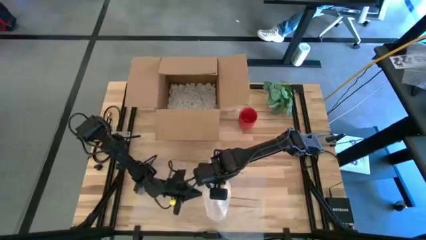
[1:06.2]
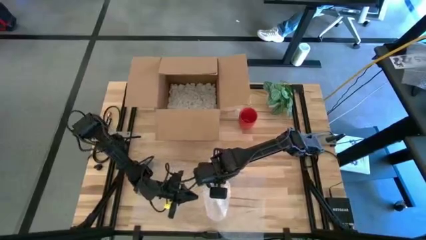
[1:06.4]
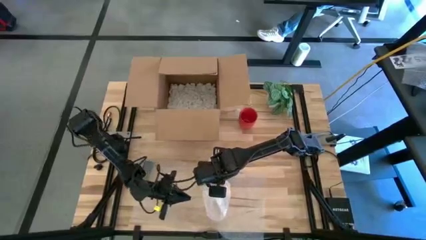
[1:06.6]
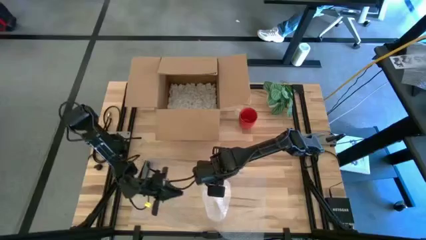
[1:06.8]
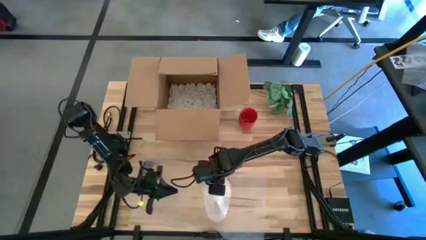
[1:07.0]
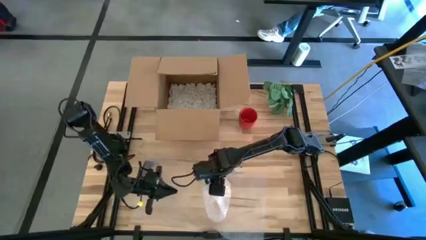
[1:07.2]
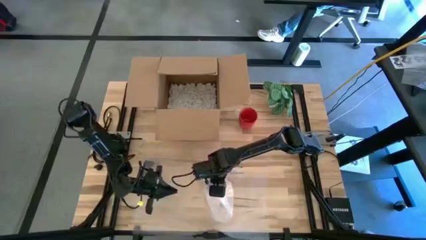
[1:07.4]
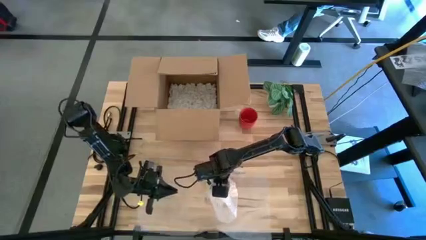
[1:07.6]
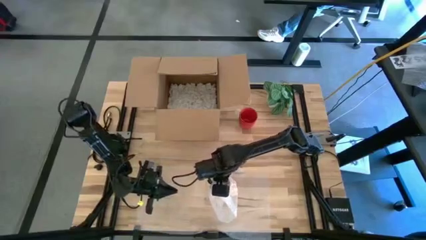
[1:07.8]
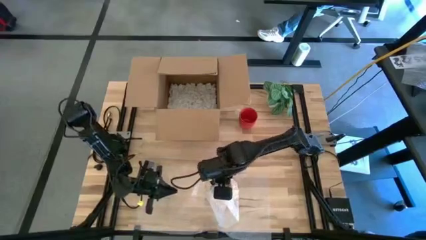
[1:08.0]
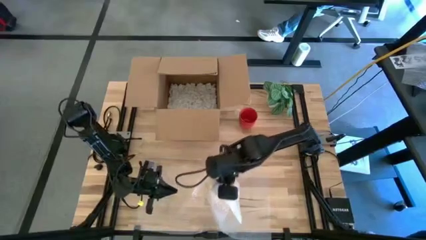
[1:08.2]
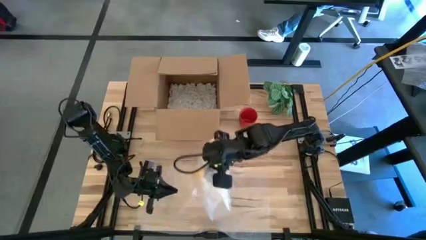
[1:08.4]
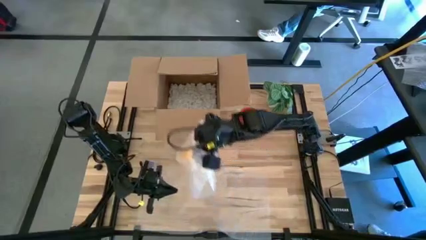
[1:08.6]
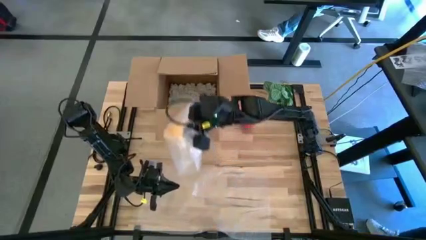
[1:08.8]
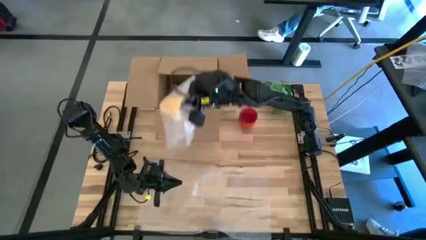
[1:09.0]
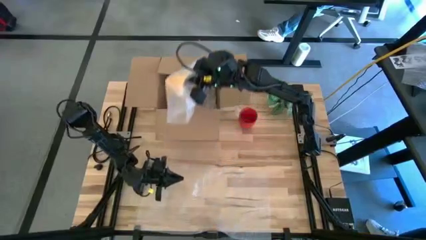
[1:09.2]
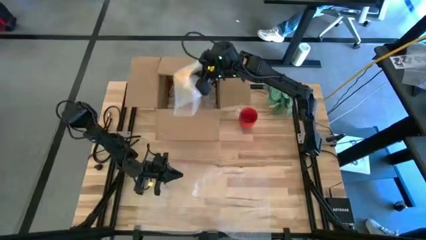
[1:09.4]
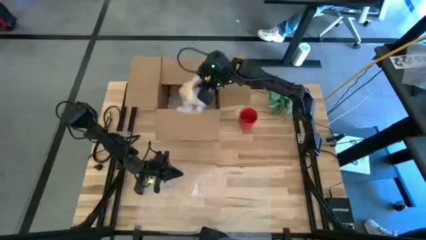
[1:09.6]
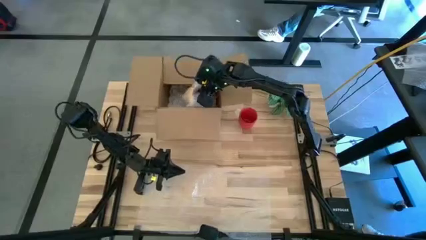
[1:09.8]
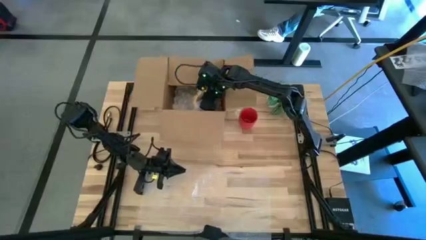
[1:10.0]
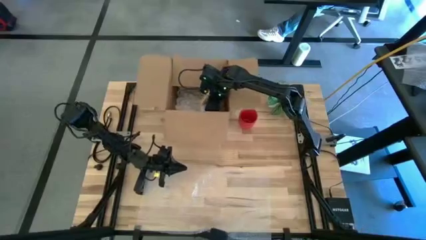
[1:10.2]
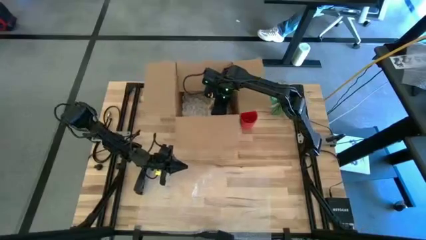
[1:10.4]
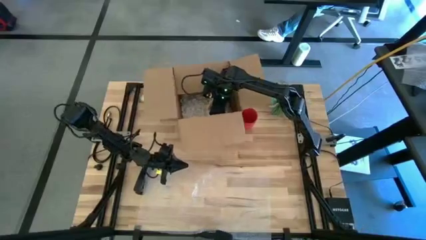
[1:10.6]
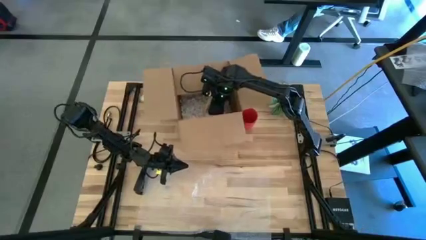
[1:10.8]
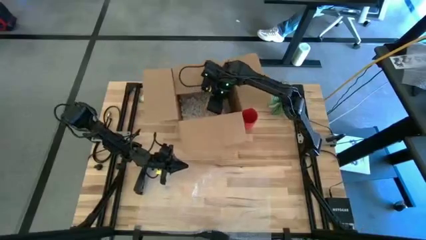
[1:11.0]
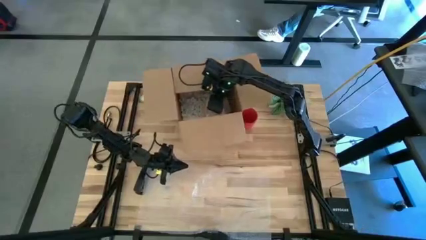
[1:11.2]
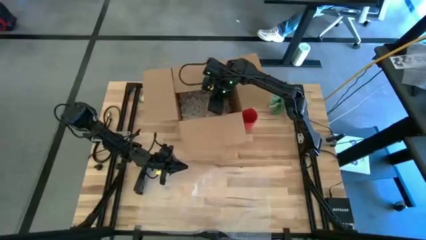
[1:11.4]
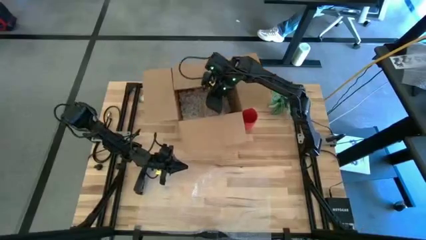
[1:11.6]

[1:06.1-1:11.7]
Task: wrap mug
Put the wrapped yellow mug into the cardboard box

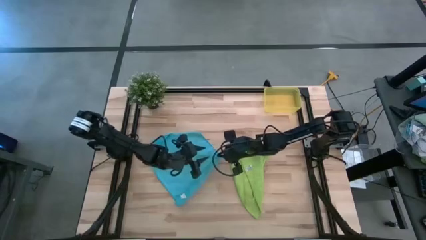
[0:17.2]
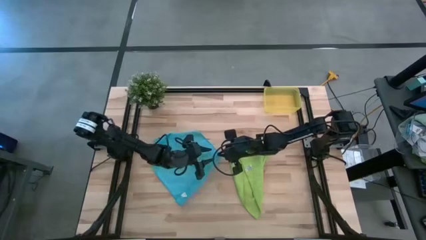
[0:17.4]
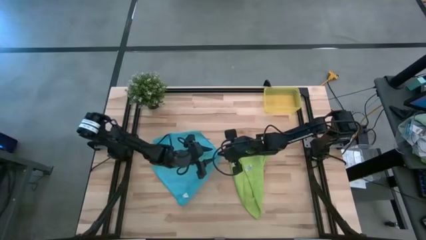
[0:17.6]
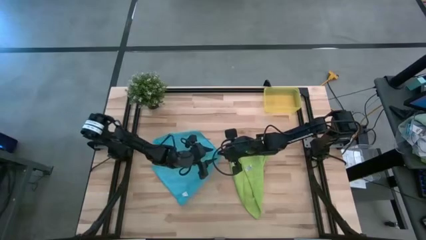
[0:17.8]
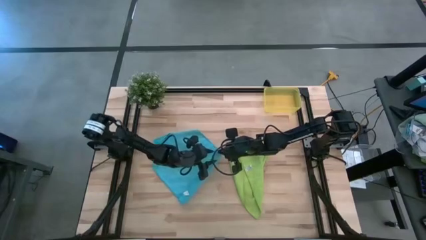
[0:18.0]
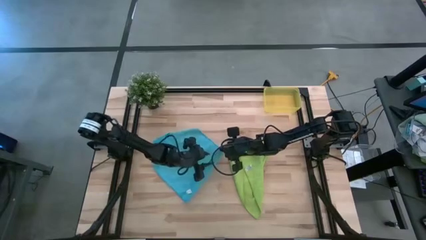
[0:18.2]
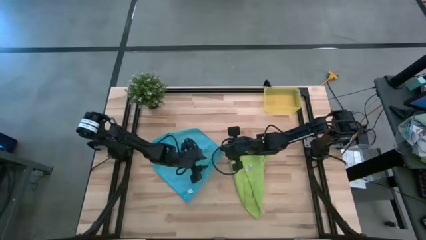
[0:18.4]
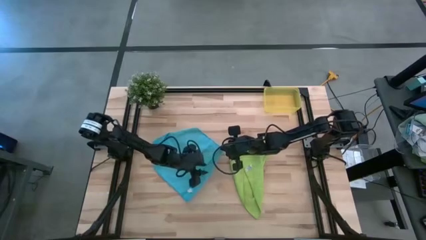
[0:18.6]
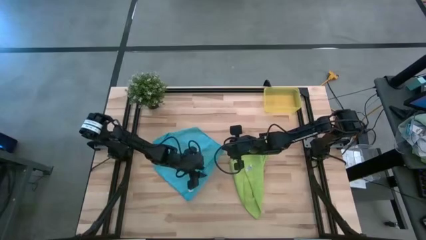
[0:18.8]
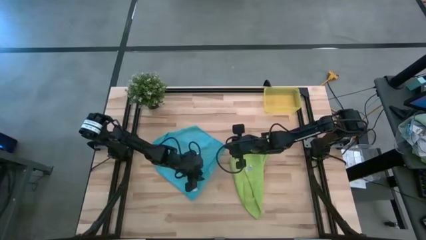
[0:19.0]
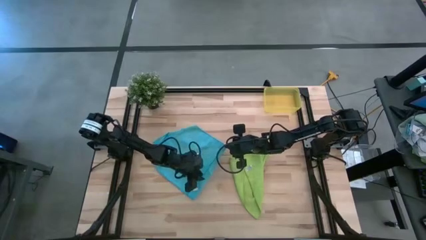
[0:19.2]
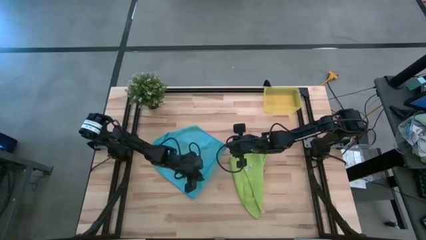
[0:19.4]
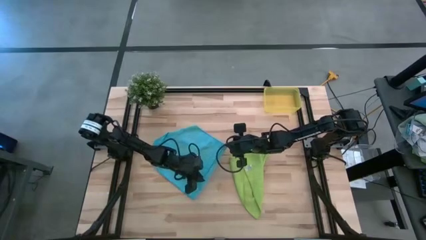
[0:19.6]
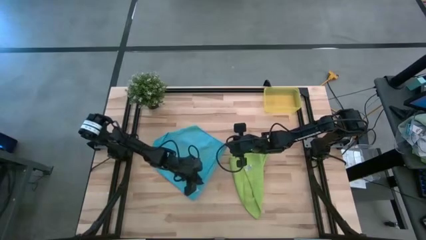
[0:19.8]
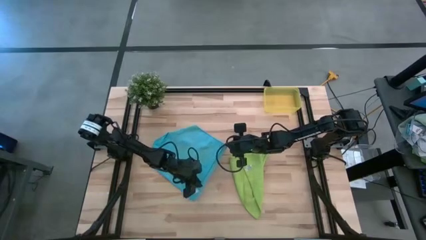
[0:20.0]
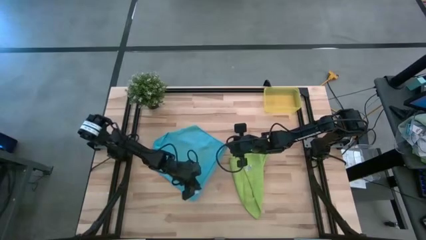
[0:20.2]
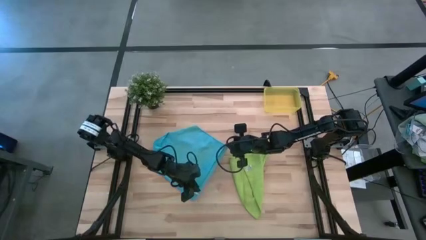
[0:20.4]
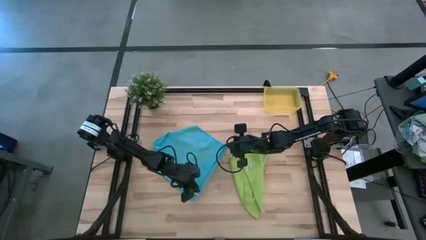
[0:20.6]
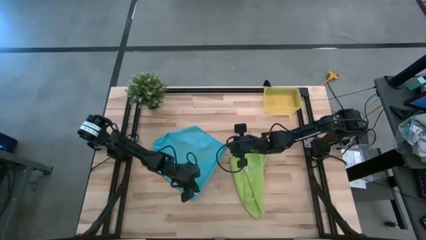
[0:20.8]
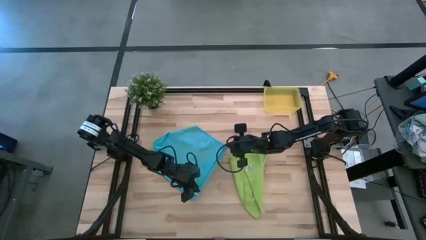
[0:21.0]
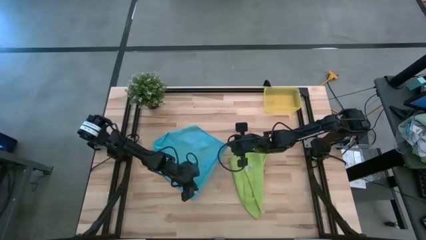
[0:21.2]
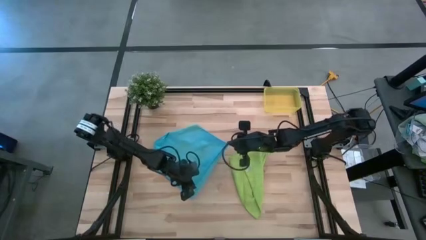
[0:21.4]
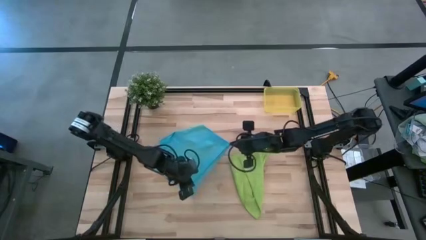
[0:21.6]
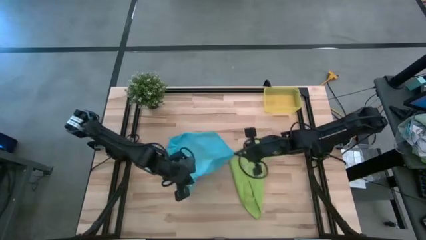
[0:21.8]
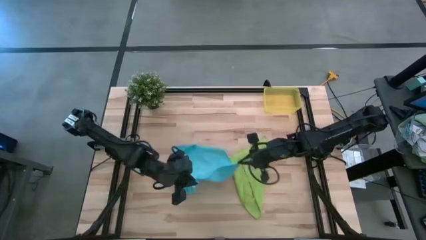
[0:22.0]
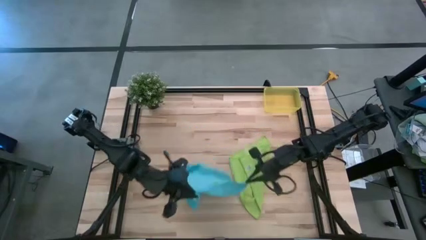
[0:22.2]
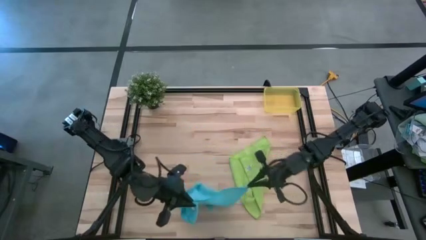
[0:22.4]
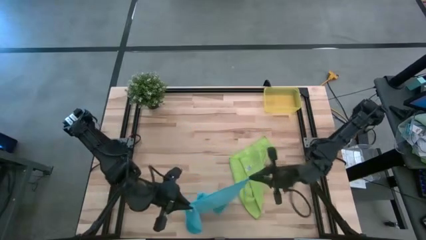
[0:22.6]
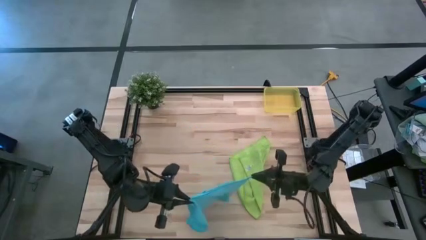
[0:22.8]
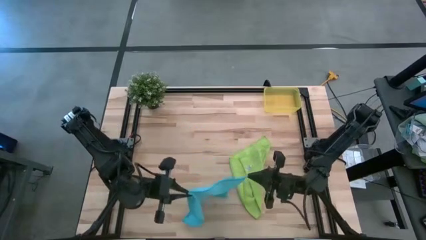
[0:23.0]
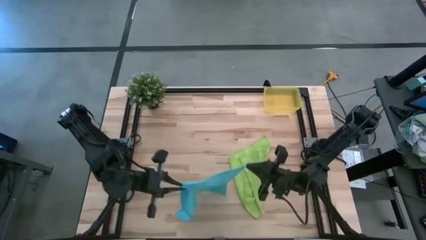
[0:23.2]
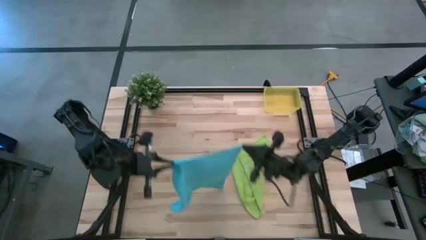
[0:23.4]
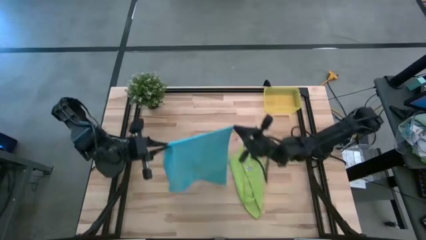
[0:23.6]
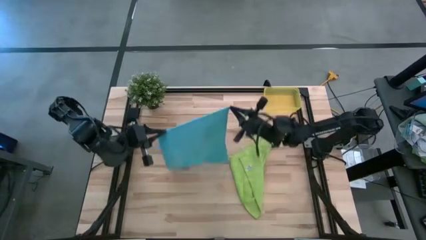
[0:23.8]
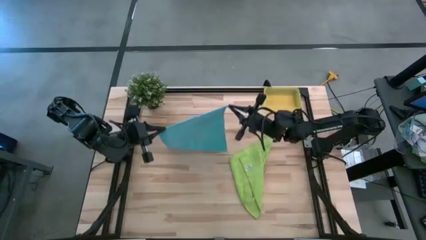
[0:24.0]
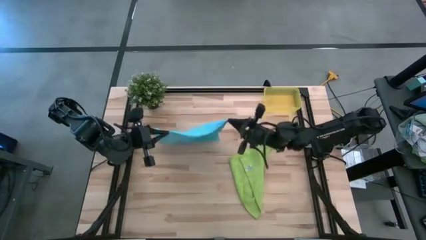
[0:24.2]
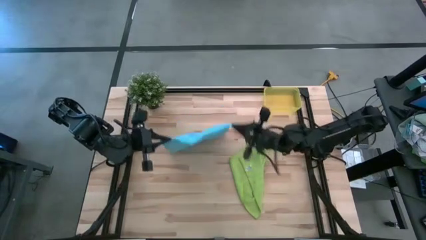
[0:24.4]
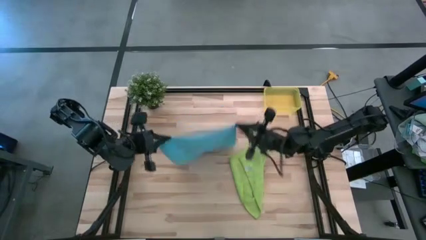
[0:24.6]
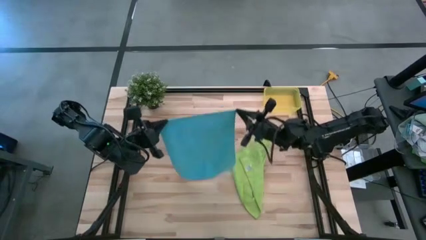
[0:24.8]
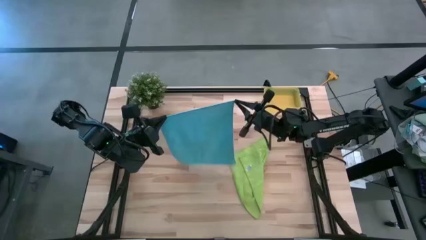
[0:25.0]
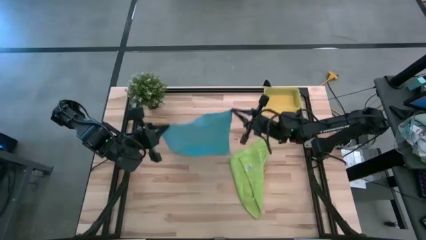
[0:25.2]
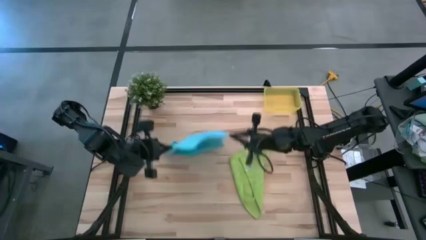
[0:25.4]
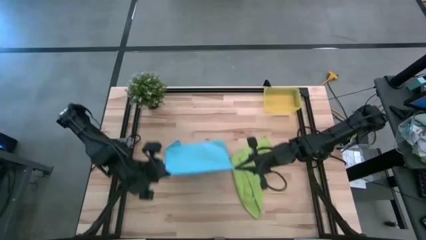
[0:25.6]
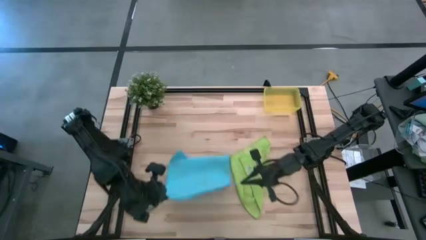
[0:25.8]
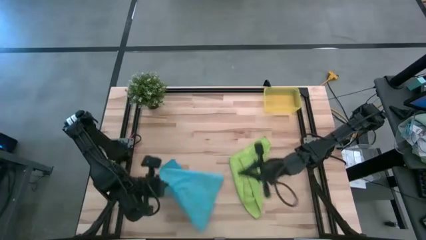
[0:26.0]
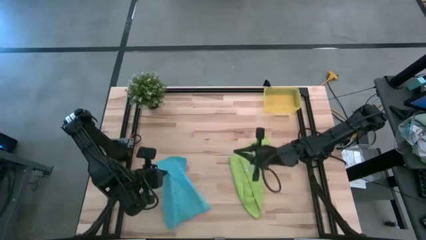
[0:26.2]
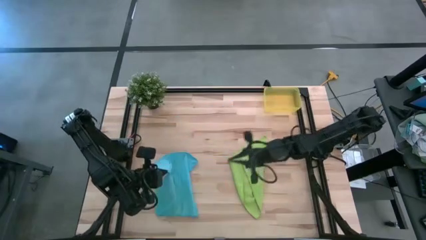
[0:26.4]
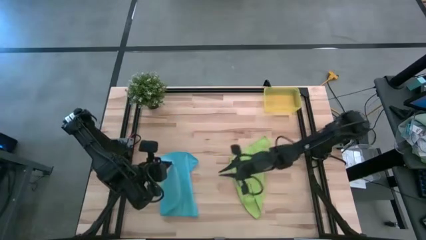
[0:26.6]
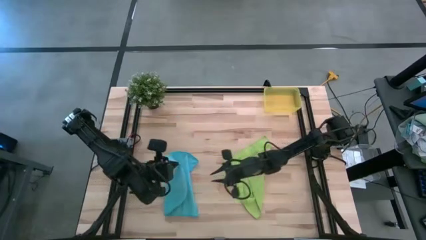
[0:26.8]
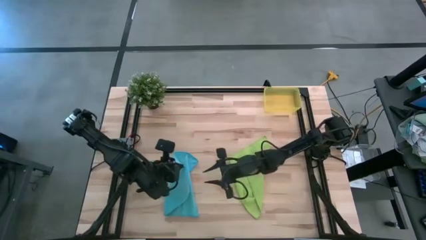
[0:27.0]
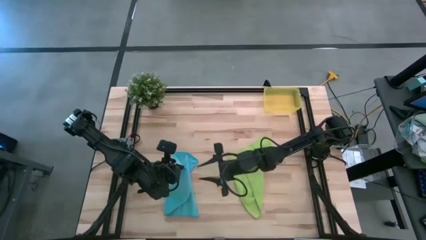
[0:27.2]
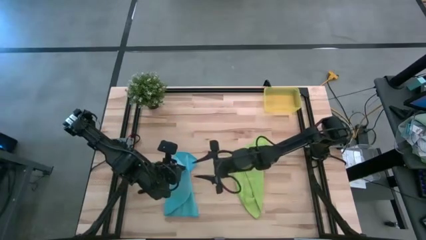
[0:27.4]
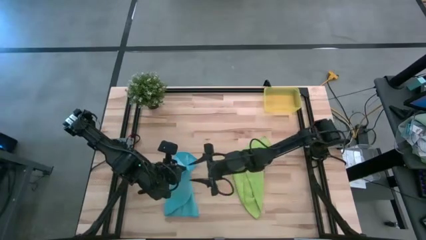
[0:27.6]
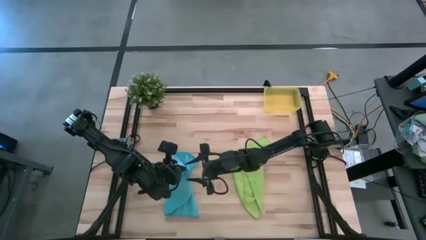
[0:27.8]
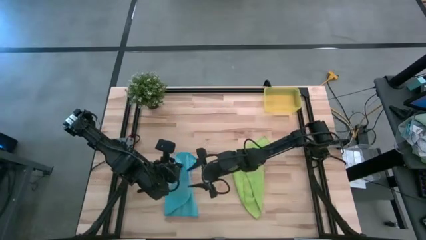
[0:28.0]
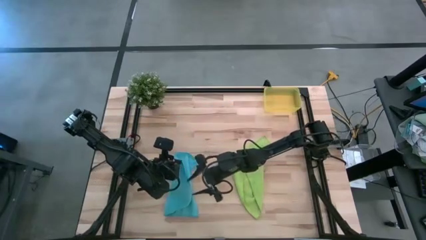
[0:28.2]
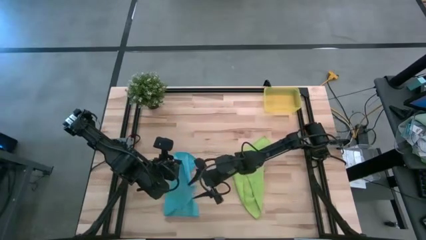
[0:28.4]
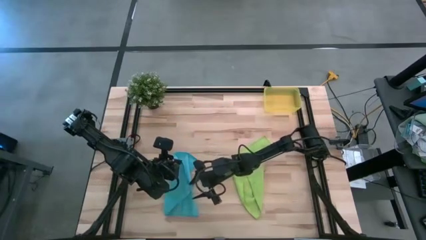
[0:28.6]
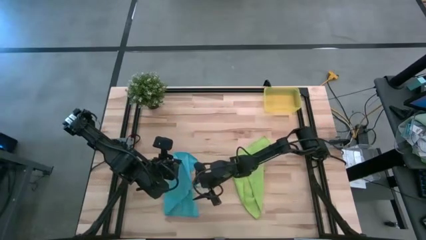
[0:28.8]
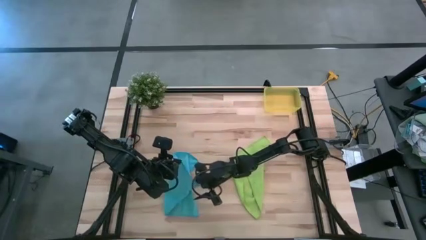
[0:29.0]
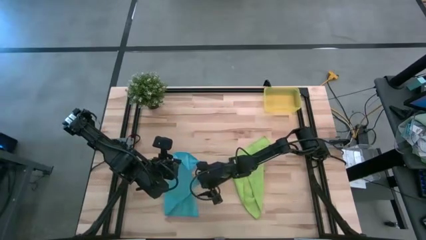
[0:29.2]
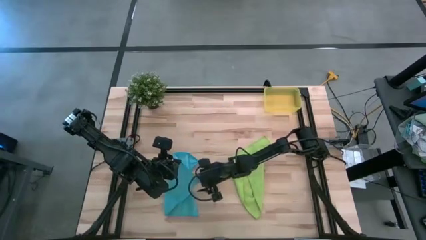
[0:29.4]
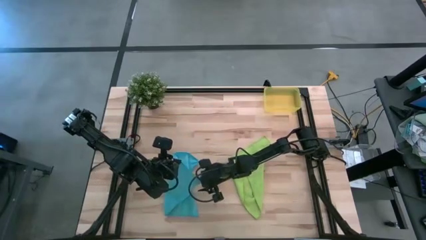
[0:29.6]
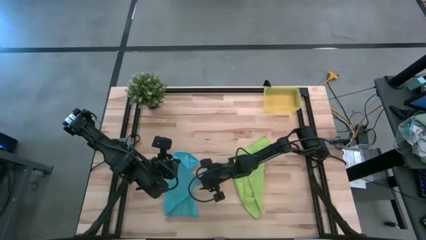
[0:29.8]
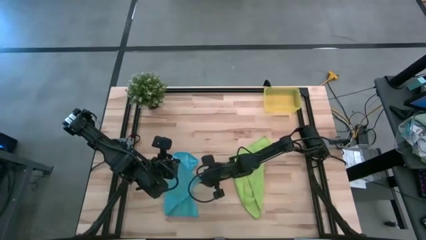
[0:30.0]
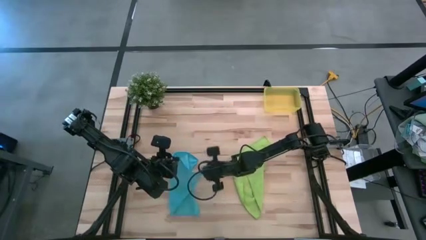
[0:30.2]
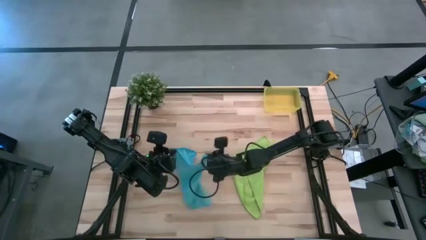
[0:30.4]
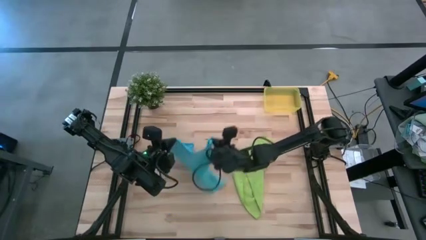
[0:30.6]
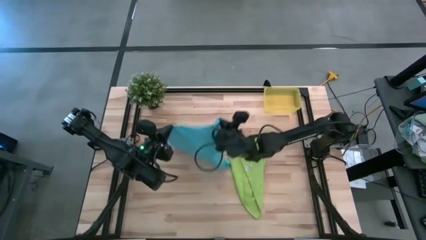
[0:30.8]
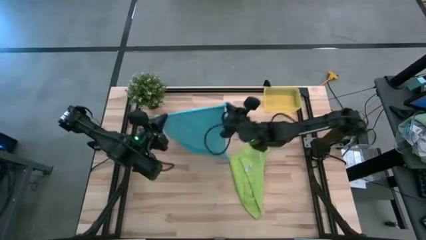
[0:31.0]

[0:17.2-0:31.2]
Task: Roll microfiber towels into tight, uniform cylinder then place into a basket
Fold the blue microfiber towel
